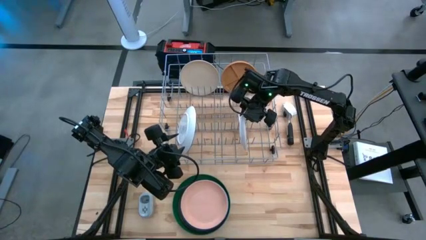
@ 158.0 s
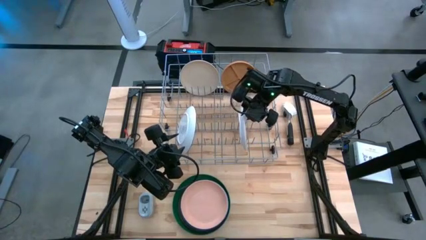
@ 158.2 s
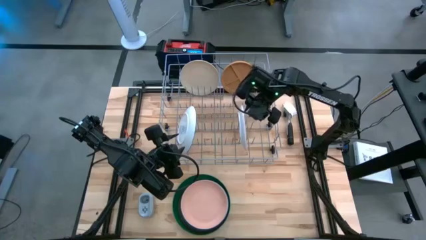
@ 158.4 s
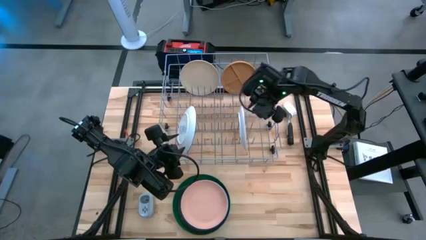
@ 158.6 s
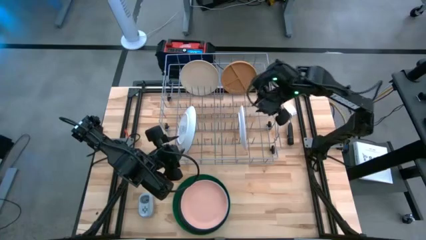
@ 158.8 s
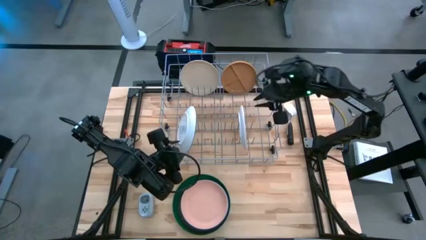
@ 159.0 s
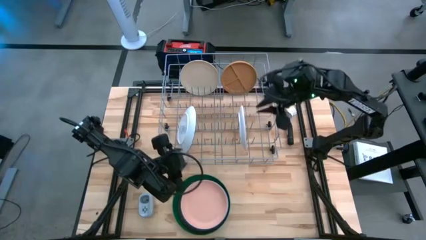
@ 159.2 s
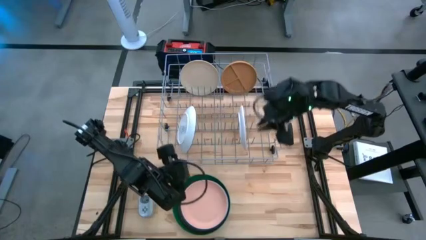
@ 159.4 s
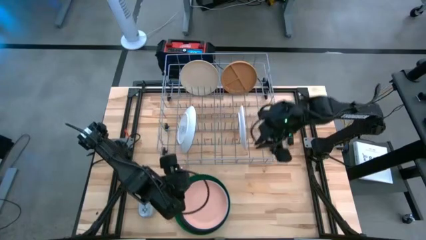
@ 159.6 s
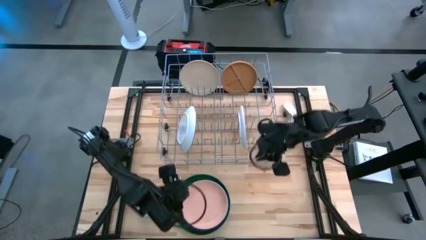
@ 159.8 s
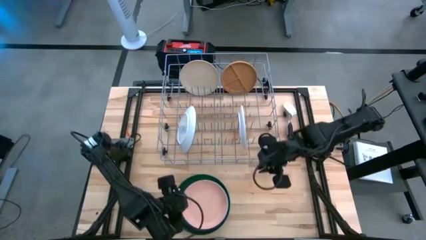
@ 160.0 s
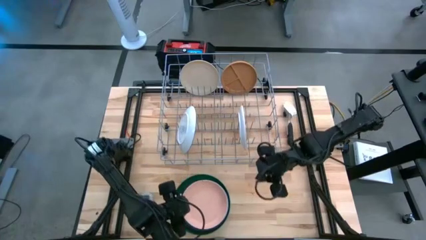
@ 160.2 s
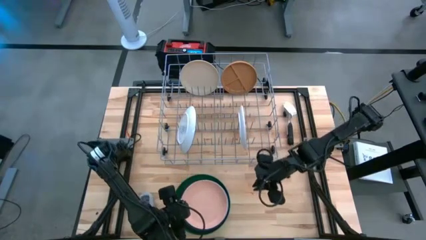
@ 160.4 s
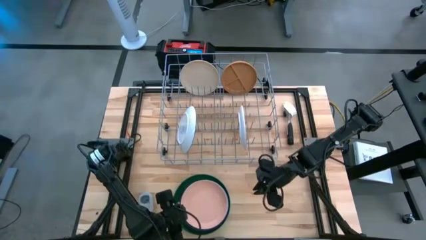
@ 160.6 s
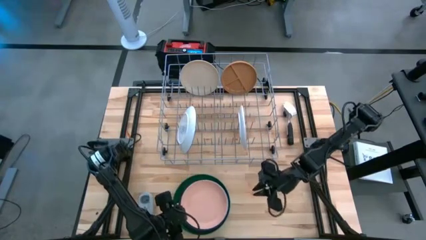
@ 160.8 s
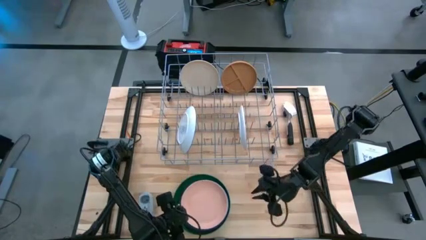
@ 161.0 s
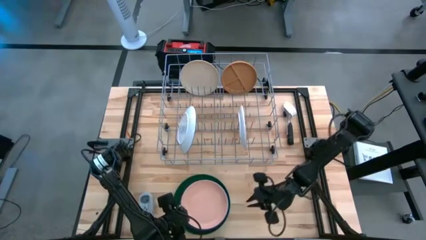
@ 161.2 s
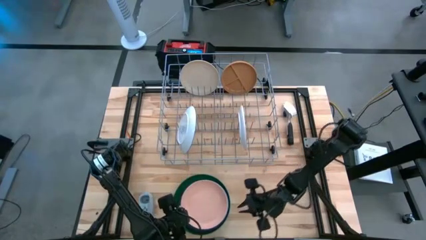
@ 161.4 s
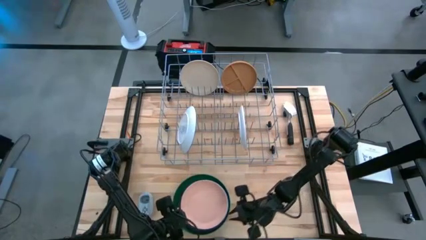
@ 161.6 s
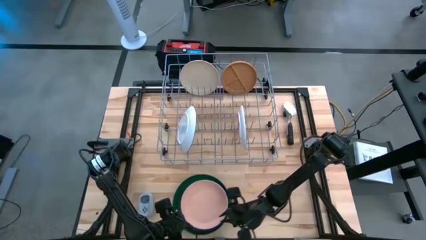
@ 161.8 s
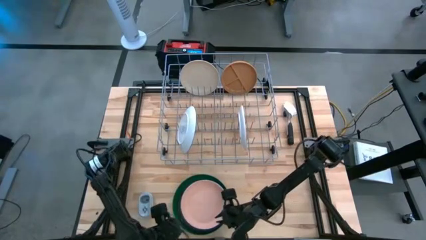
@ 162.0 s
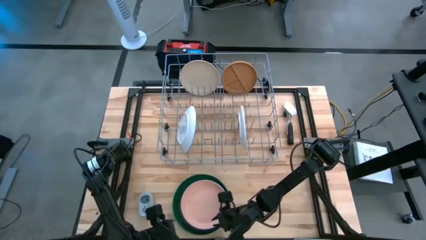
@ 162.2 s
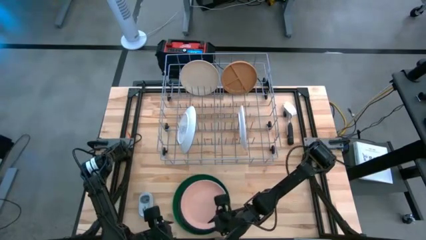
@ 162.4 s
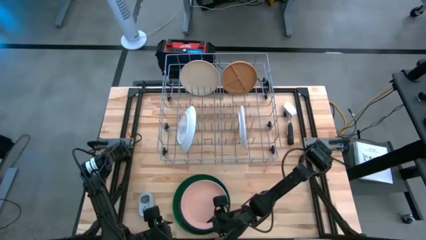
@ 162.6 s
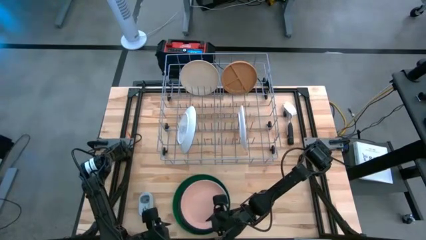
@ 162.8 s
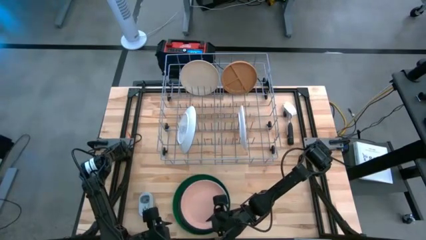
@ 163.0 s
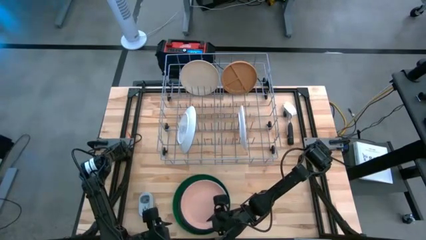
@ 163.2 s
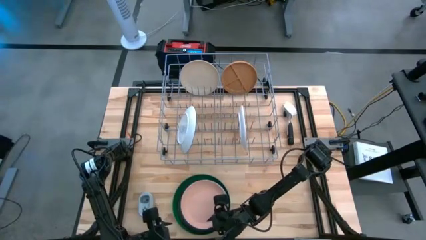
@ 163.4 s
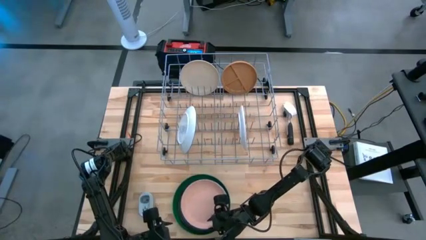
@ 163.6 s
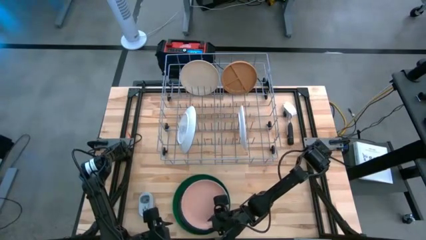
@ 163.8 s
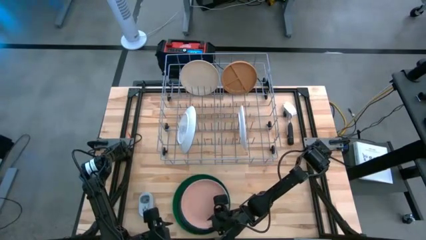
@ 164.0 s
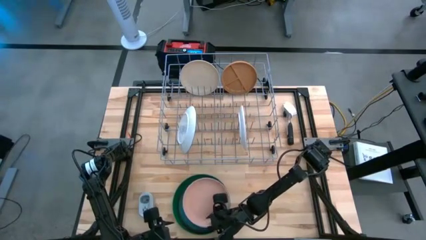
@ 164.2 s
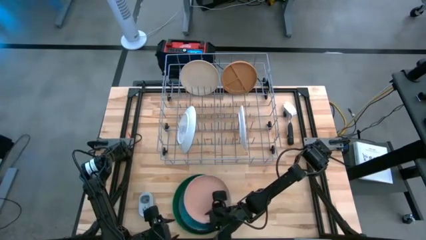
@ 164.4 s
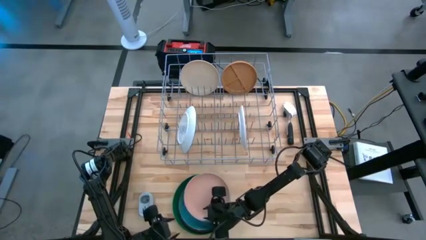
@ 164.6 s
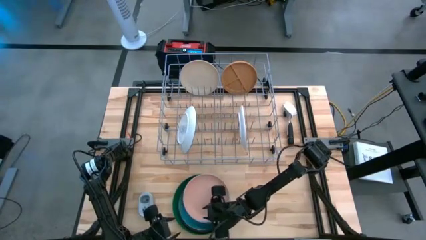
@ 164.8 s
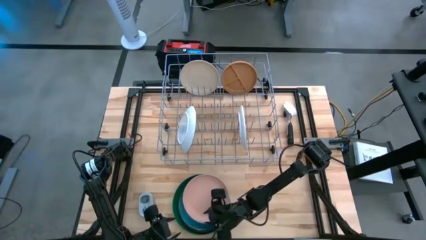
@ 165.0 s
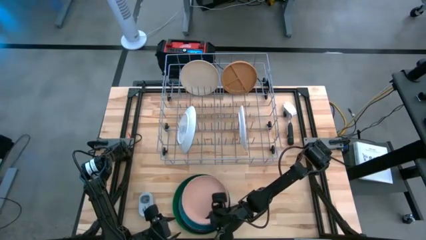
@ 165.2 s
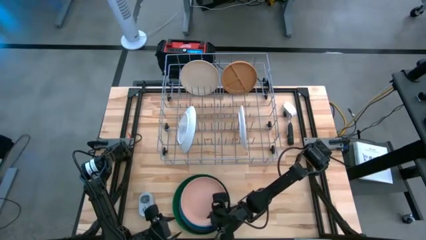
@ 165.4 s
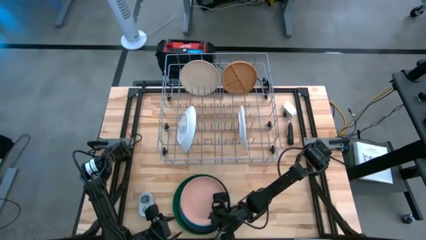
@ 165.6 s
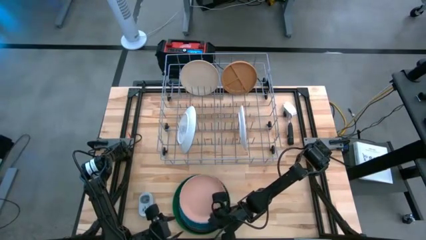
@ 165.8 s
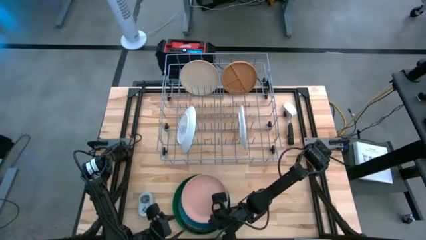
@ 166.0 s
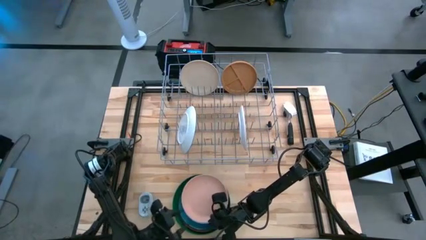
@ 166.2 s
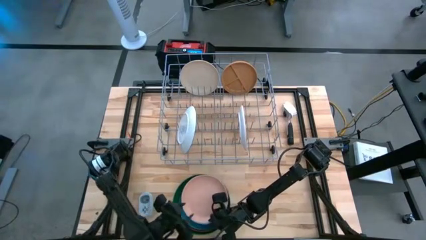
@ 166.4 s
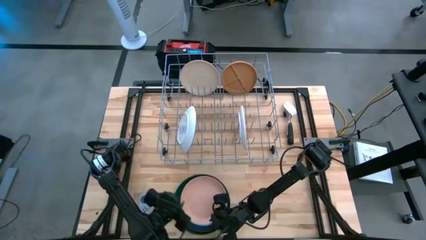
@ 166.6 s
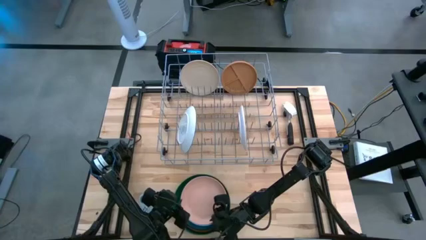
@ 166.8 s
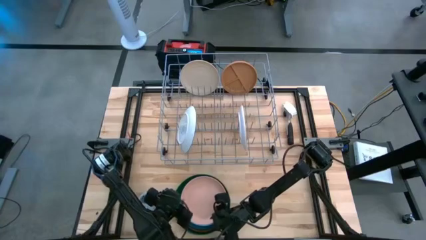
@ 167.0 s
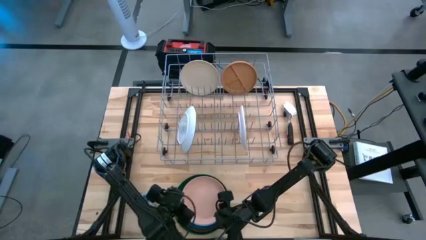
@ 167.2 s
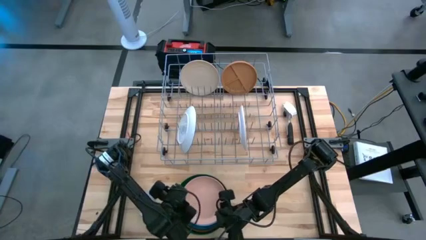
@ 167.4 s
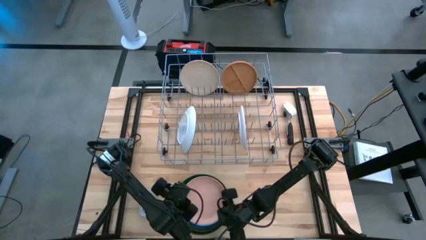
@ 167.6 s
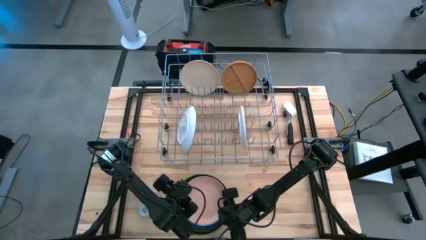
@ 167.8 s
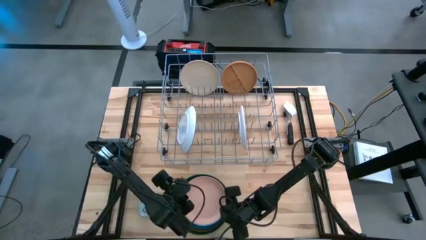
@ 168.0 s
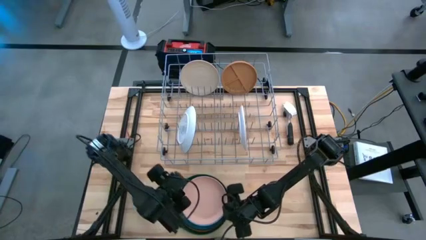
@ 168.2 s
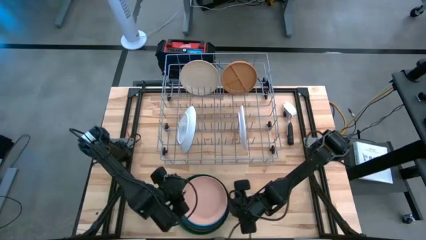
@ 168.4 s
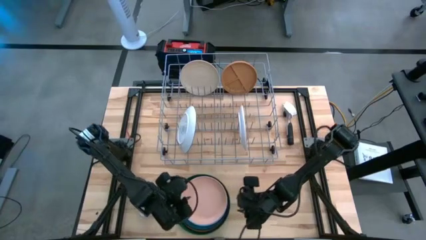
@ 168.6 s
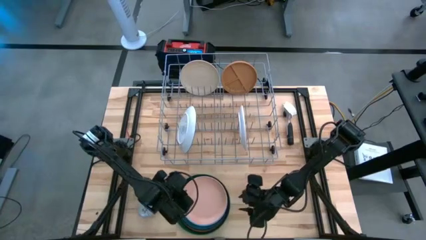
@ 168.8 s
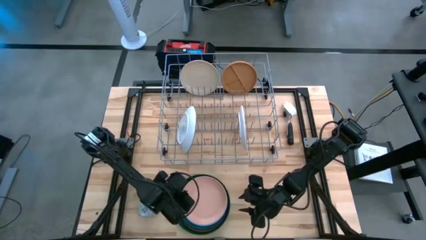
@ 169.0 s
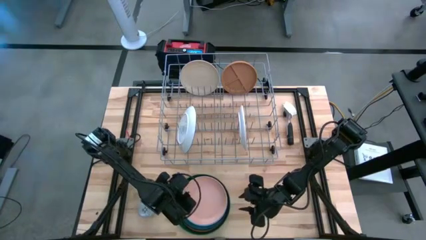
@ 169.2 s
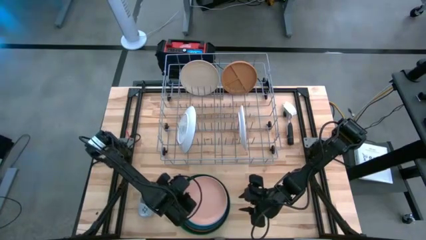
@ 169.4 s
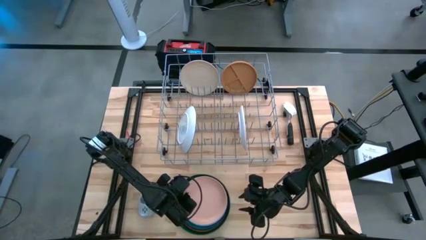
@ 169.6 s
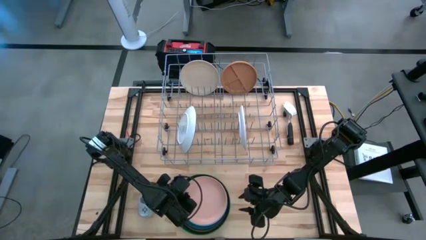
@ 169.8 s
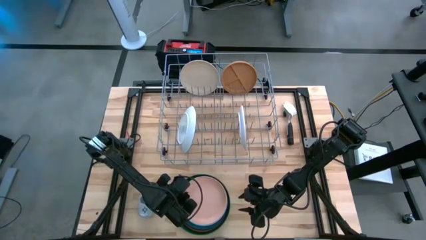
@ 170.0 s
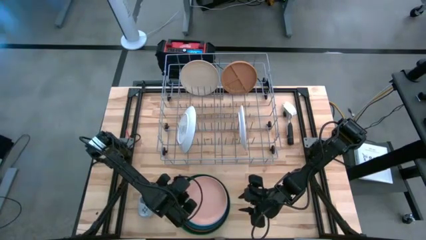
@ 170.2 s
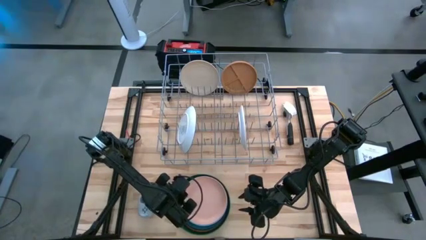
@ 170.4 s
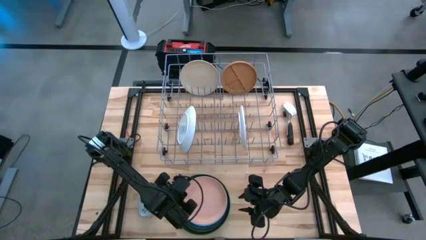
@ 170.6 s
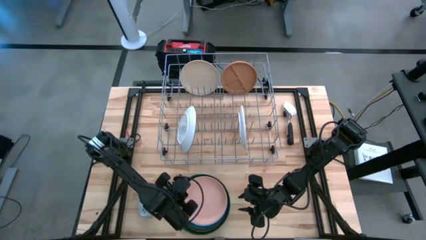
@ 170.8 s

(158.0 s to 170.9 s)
Task: Sort dishes
Put the pink plate into the dish rack
